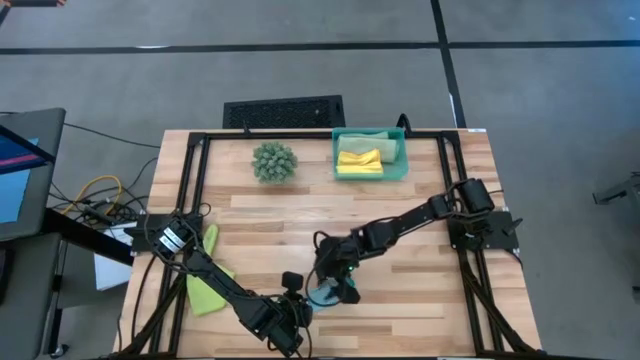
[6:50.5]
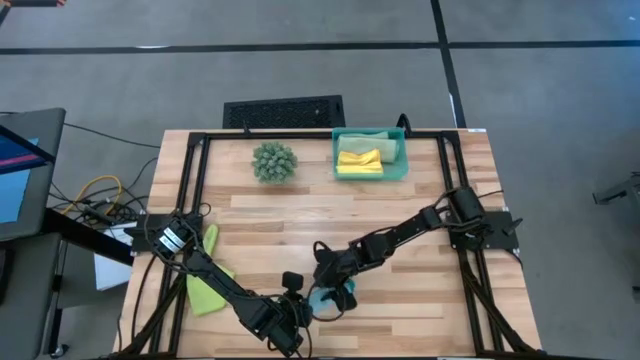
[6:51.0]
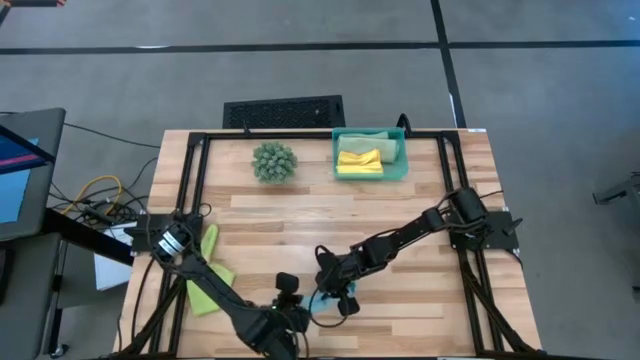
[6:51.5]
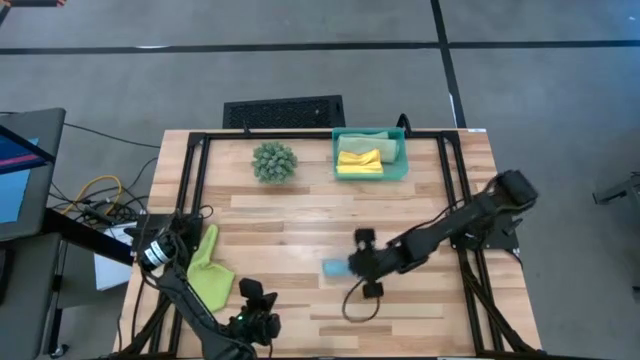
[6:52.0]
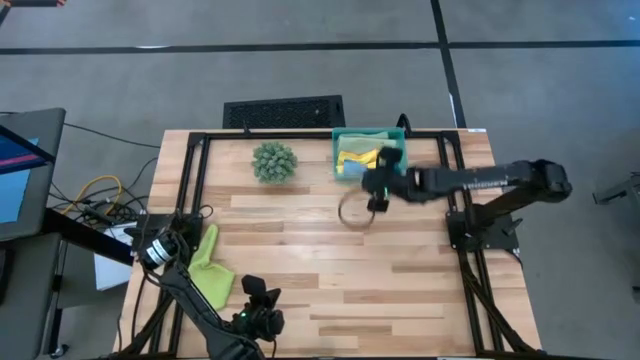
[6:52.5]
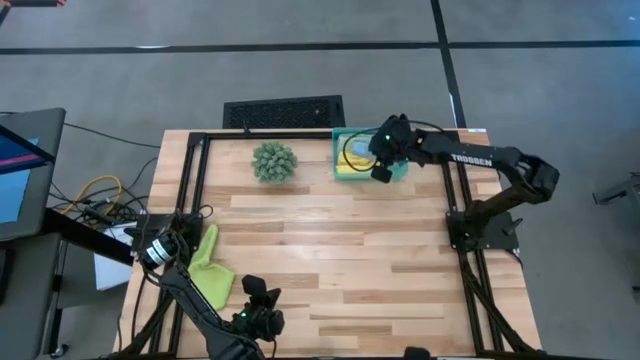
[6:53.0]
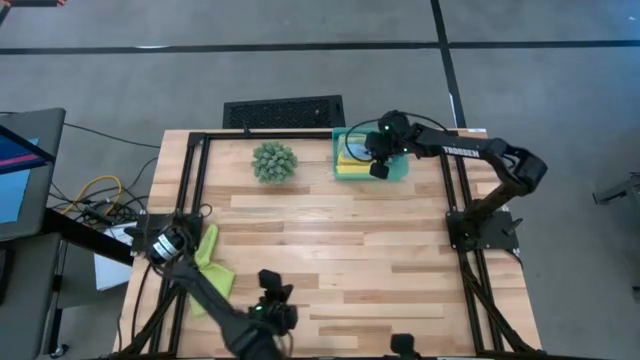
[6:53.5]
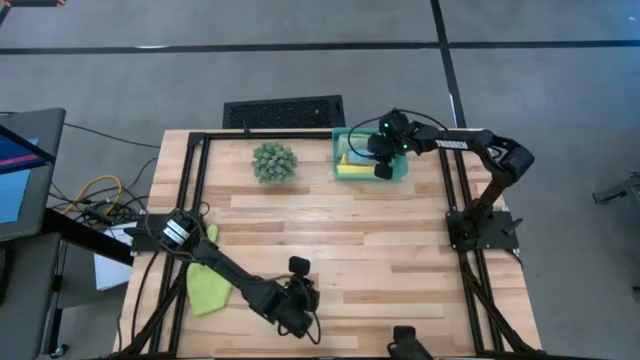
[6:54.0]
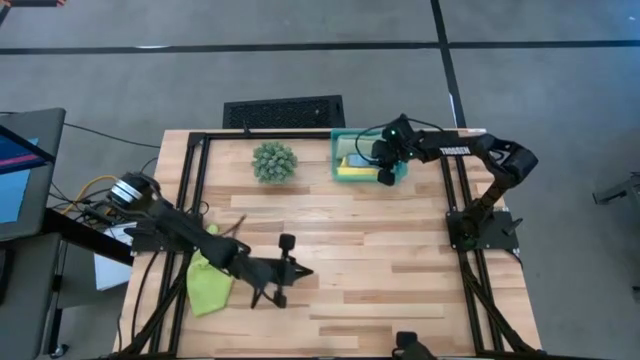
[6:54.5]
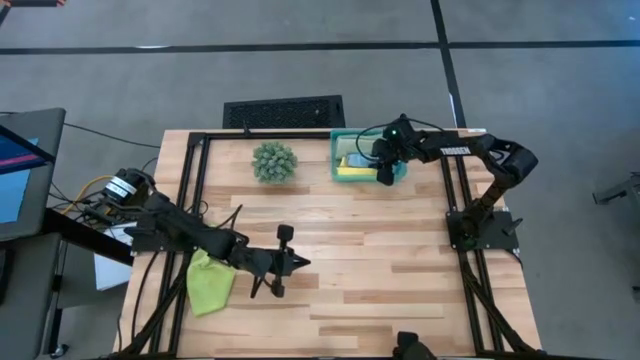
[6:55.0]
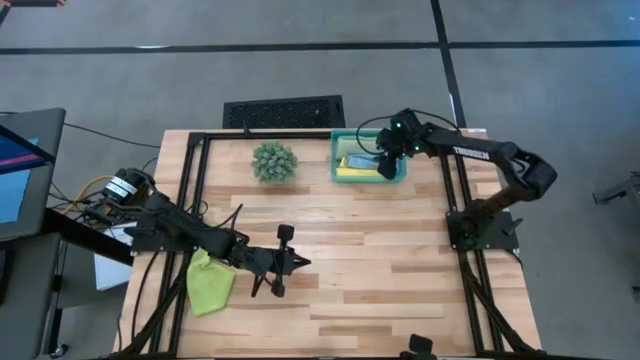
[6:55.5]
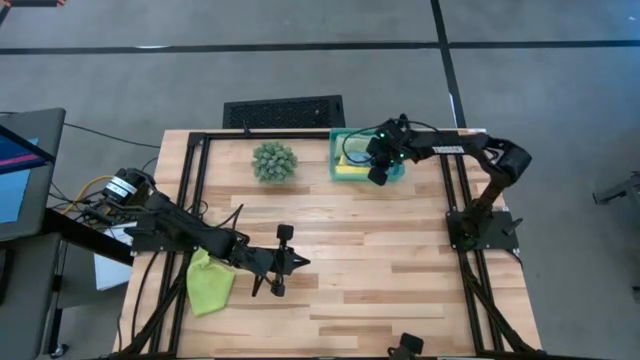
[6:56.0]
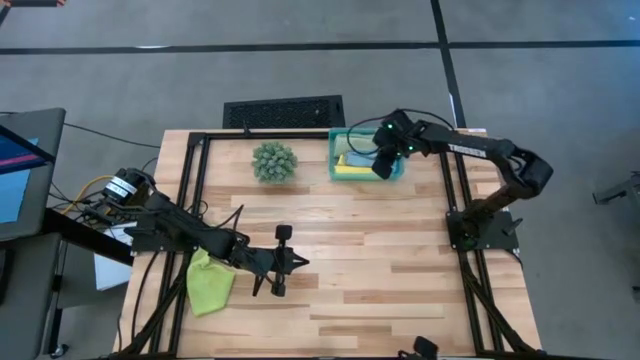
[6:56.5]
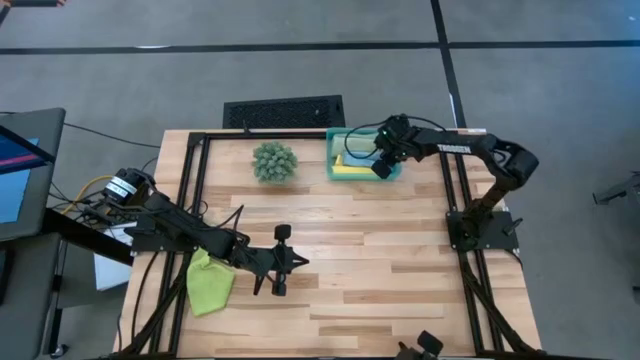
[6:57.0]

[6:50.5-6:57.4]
Task: Roll microfiber towels into tight, uniform cylinder then place into a basket
Put the blue microfiber cloth into the green organizer bin

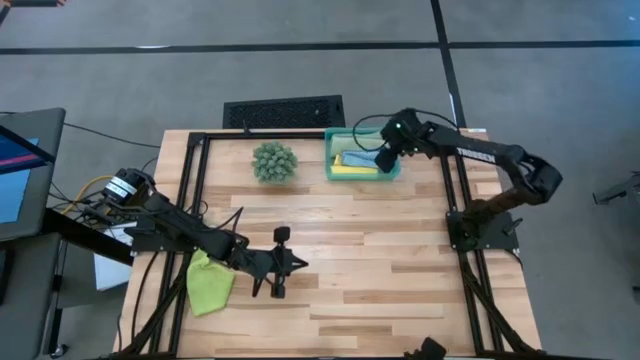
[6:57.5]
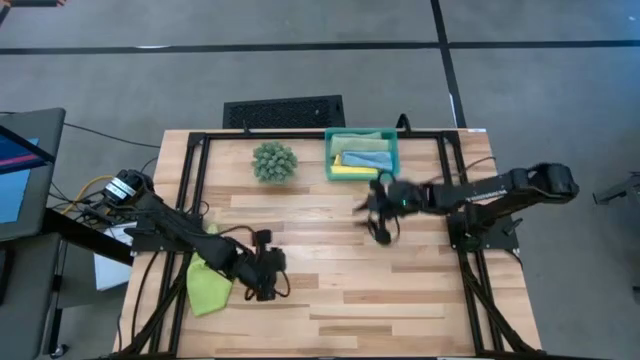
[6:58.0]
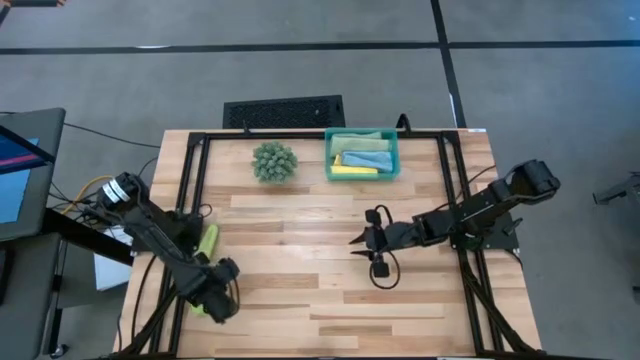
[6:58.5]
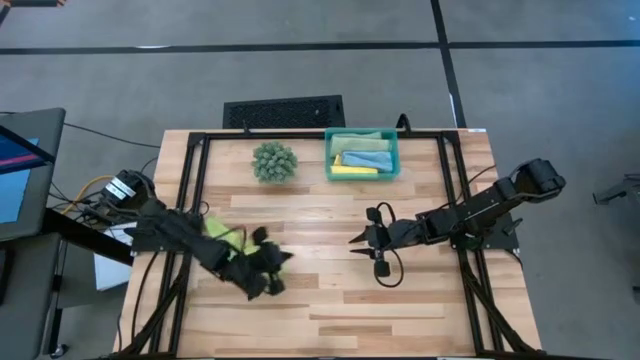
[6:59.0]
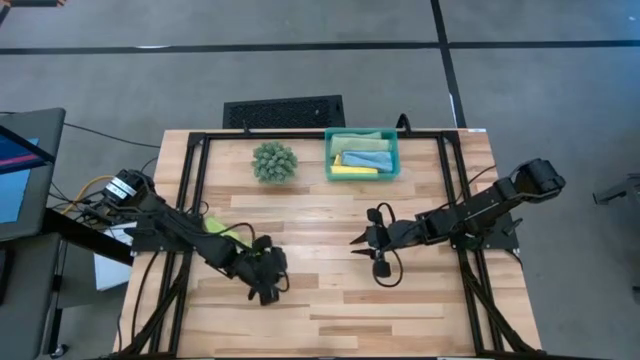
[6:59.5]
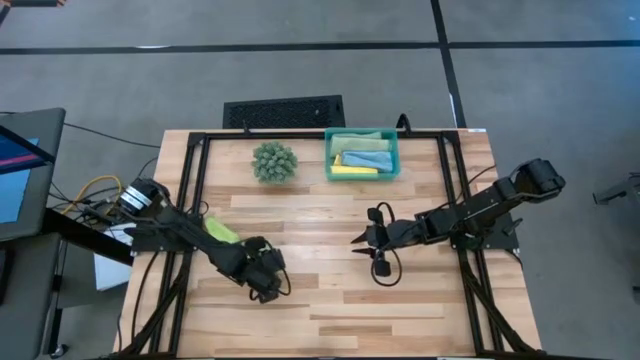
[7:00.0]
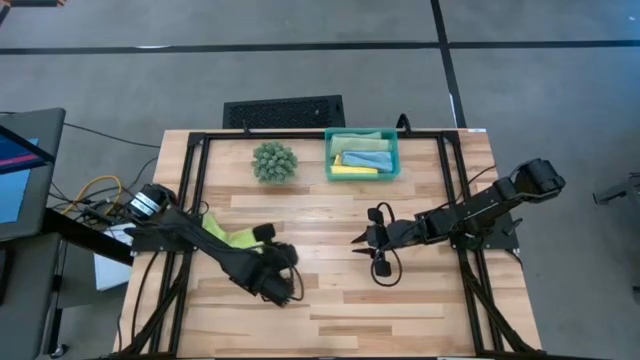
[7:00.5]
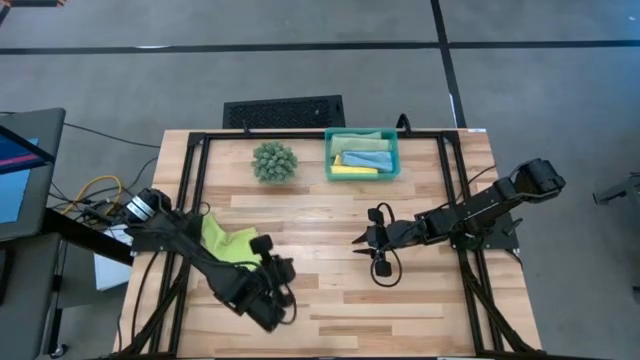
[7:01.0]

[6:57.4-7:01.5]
Roll the green microfiber cloth

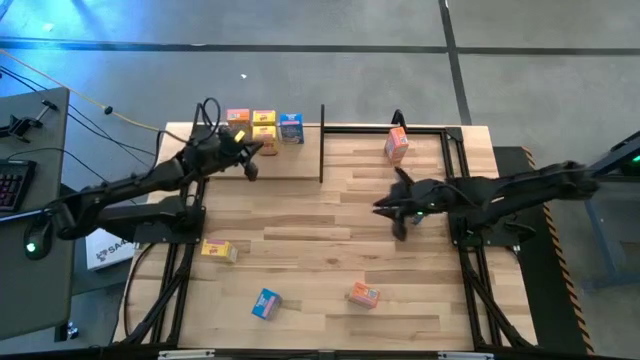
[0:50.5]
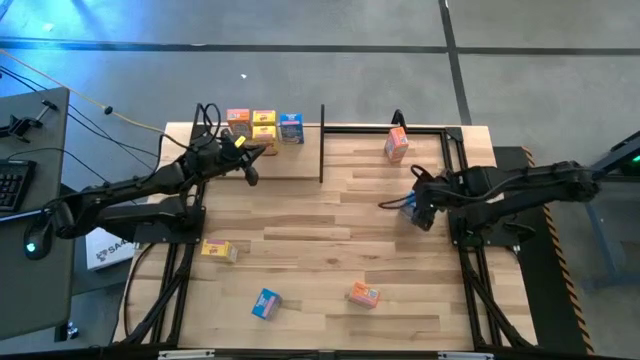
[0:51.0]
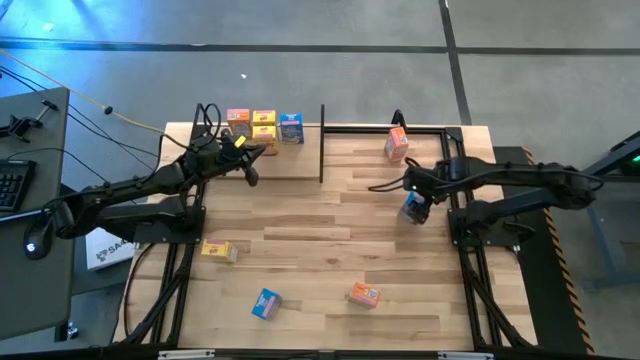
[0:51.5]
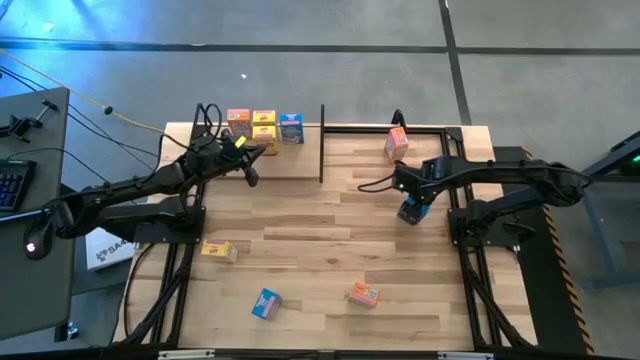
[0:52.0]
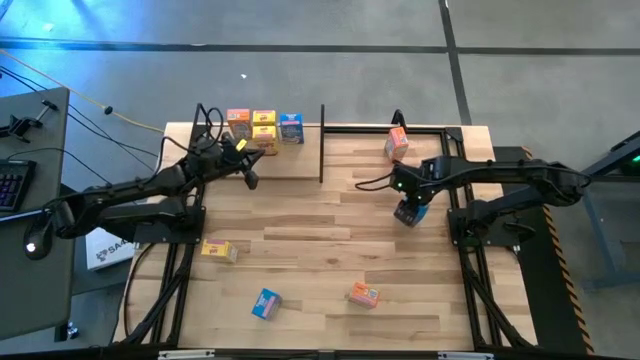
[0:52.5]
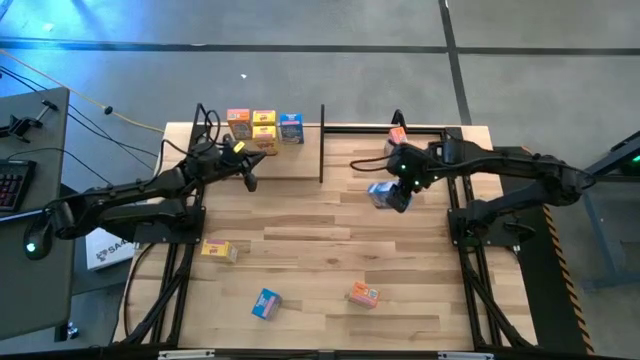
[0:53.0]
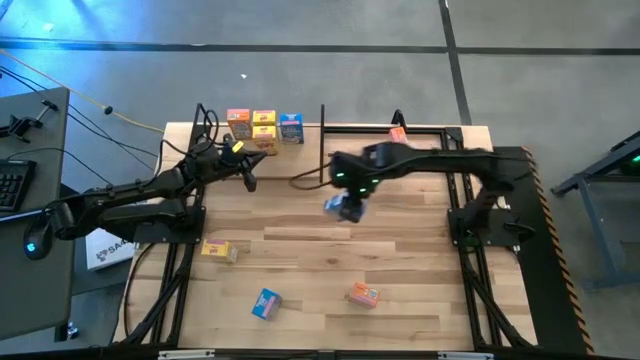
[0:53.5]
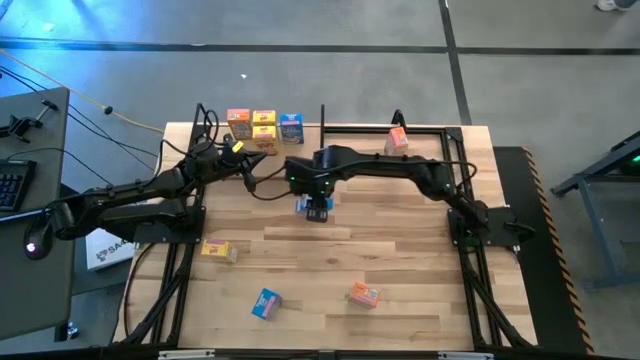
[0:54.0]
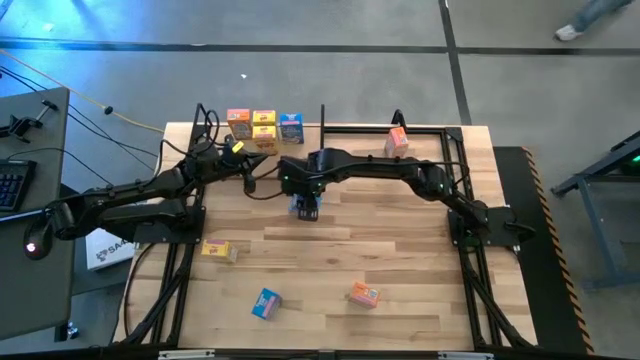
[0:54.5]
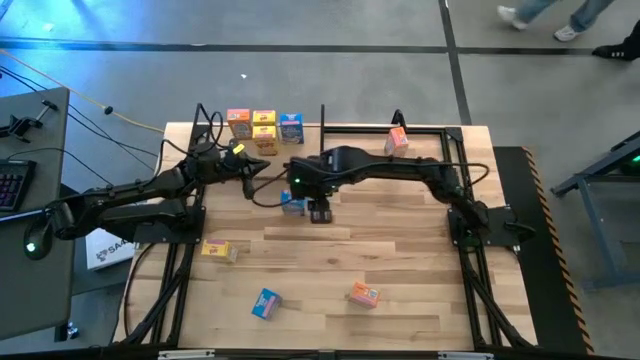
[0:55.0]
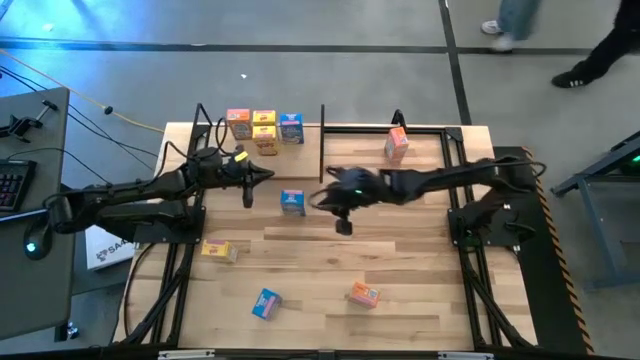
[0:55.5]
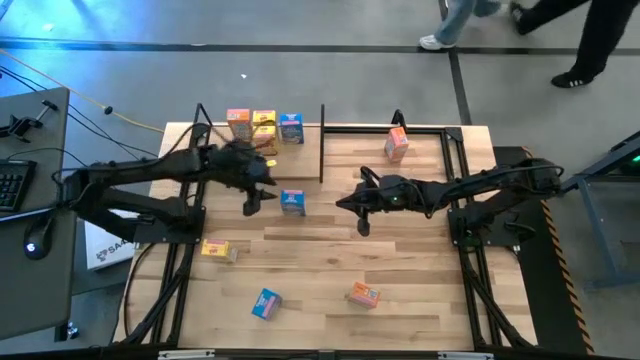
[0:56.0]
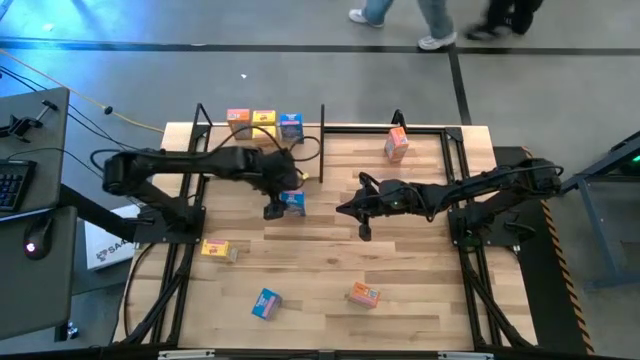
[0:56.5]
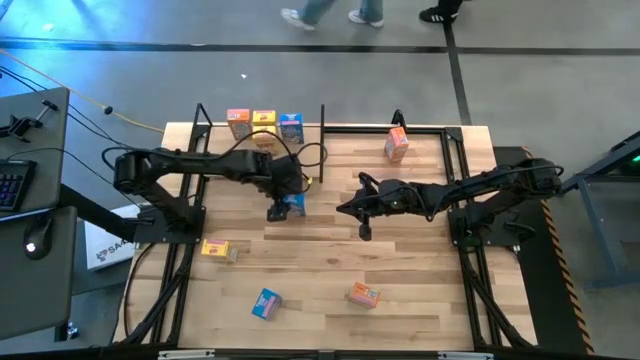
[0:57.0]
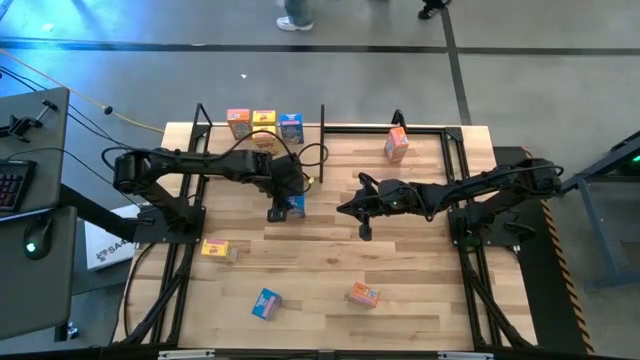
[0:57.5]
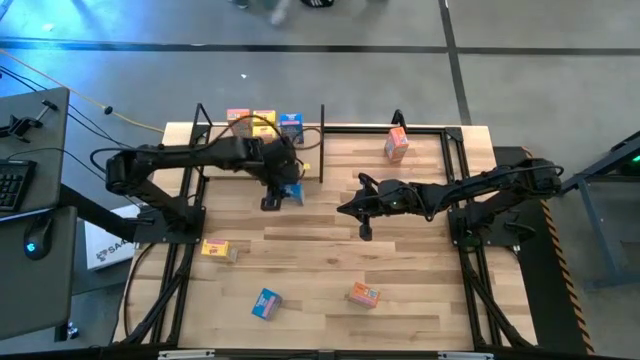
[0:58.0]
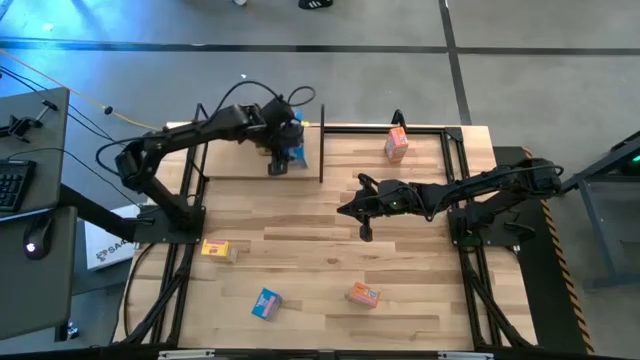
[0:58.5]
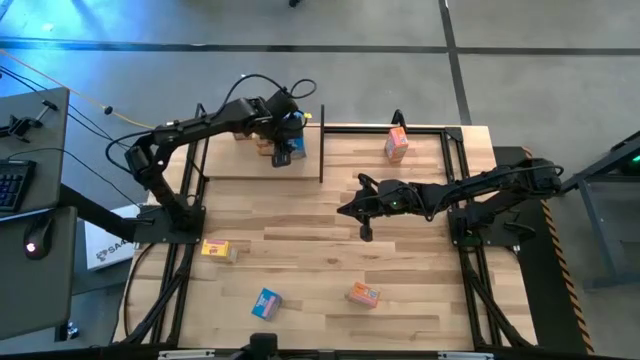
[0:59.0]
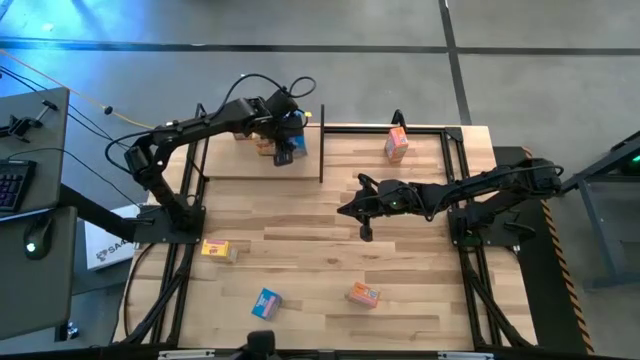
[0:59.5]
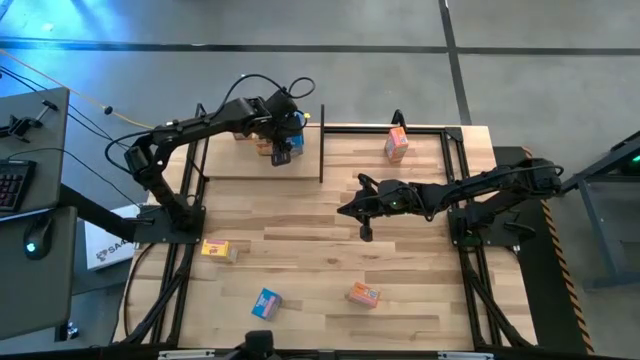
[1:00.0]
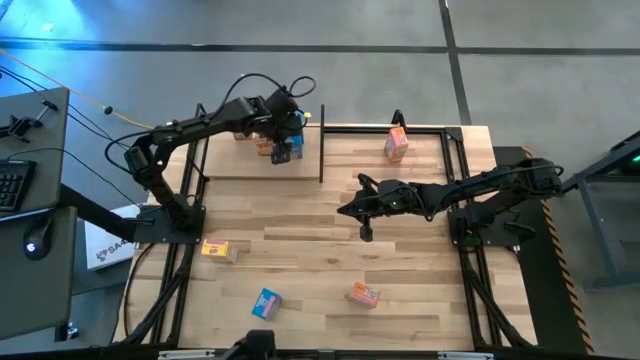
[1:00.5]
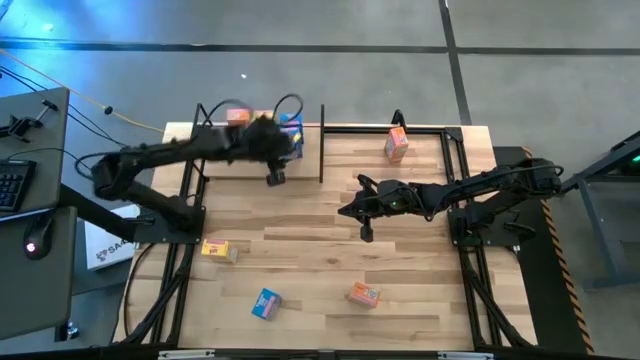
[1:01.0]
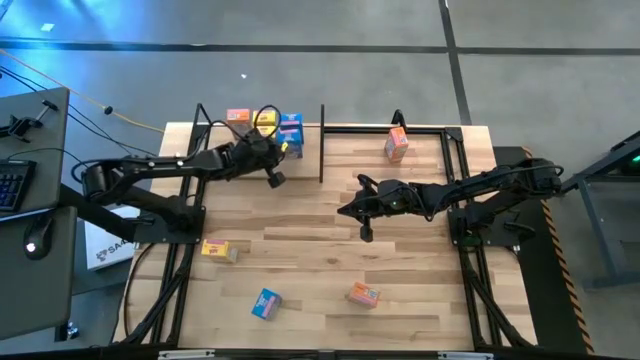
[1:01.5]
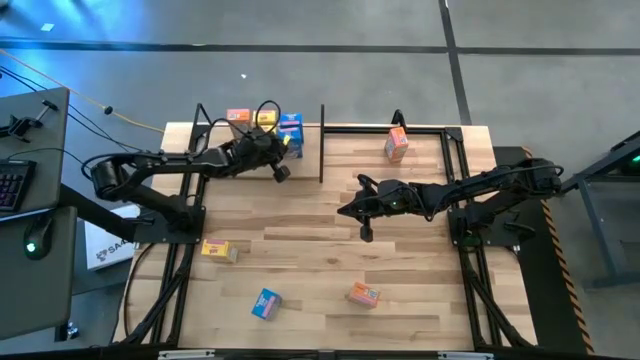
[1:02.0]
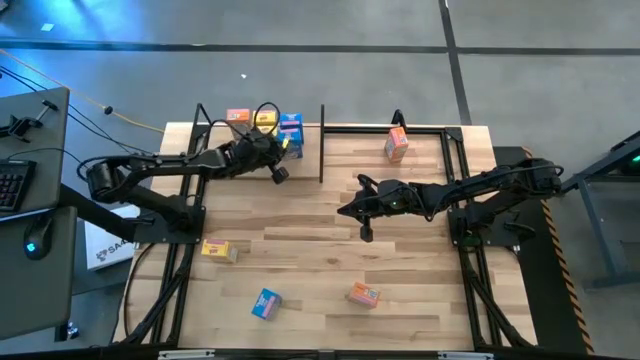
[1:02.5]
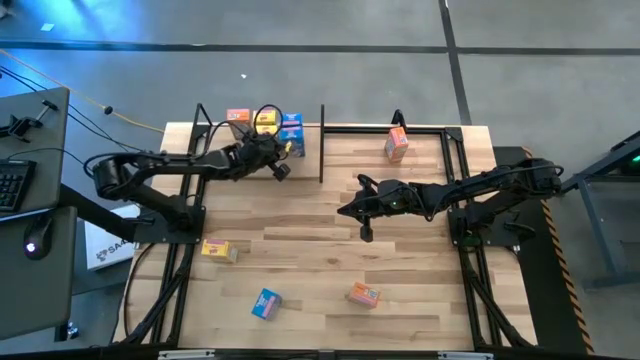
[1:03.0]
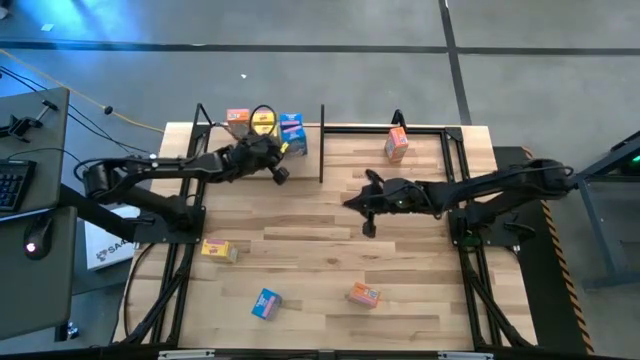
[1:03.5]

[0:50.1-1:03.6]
Task: Stack cereal on shelf
Put the top blue cereal box on the shelf aligned with the other blue cereal box
